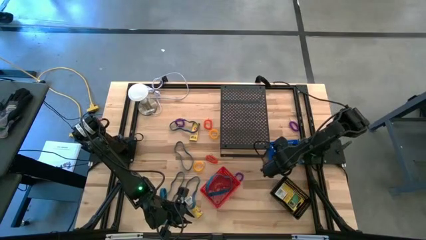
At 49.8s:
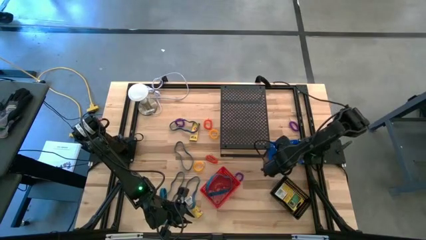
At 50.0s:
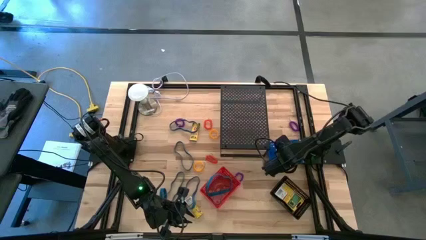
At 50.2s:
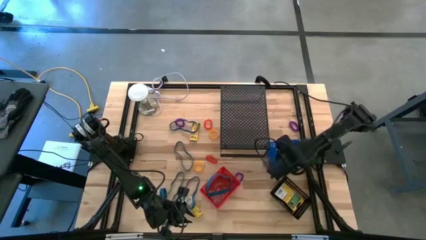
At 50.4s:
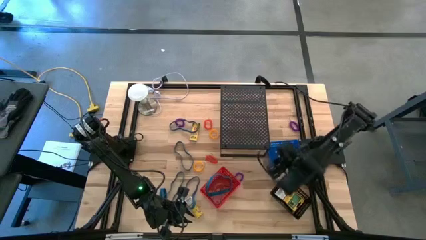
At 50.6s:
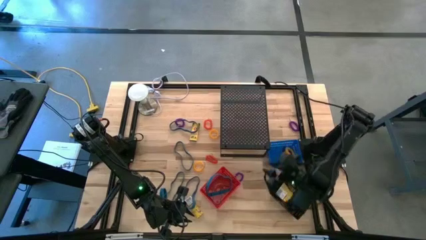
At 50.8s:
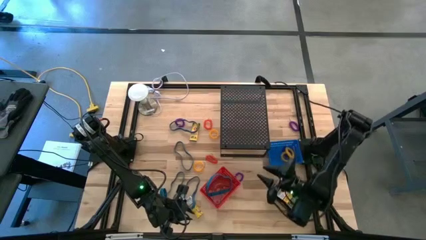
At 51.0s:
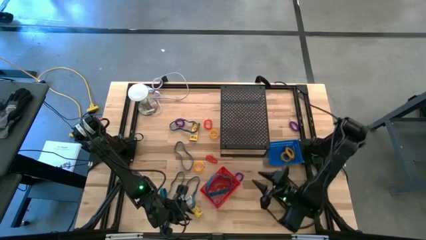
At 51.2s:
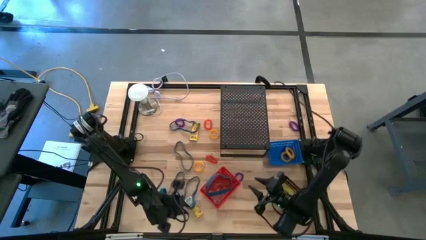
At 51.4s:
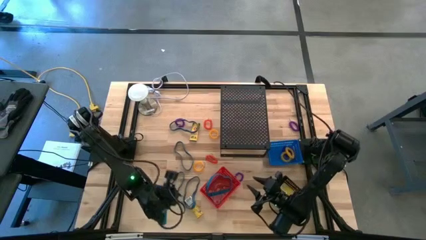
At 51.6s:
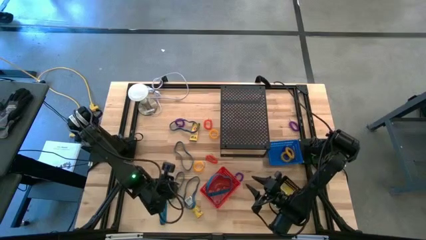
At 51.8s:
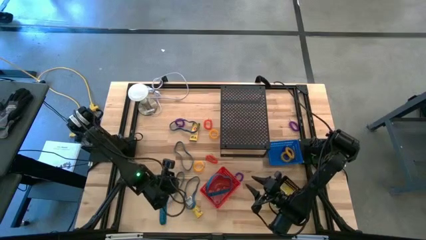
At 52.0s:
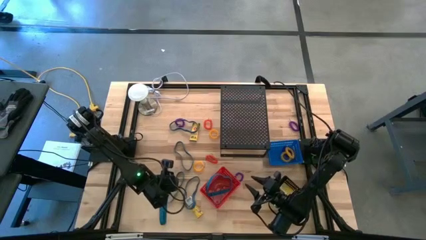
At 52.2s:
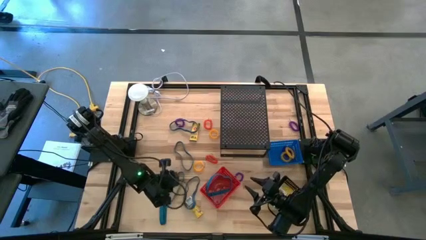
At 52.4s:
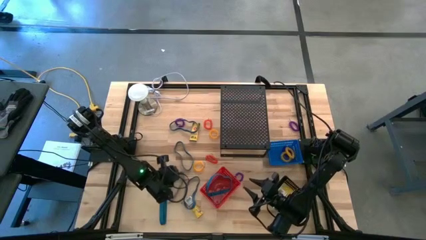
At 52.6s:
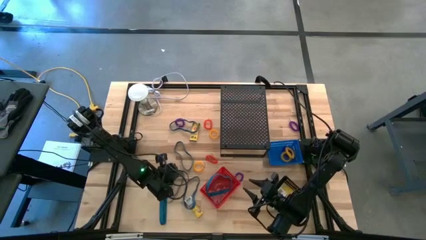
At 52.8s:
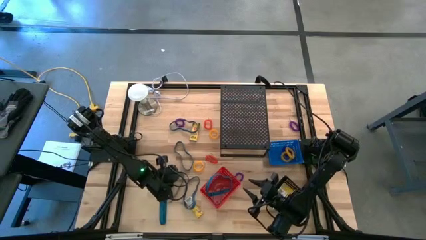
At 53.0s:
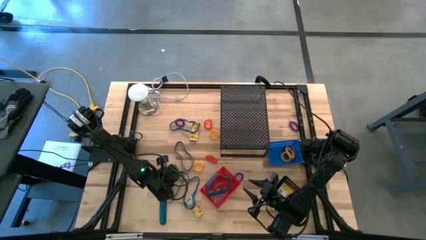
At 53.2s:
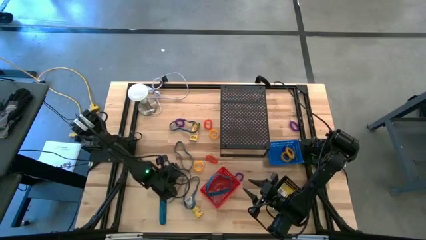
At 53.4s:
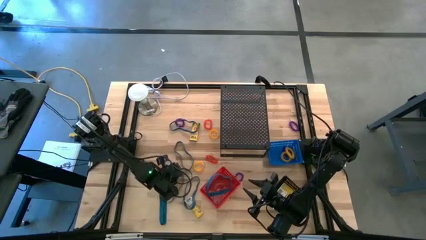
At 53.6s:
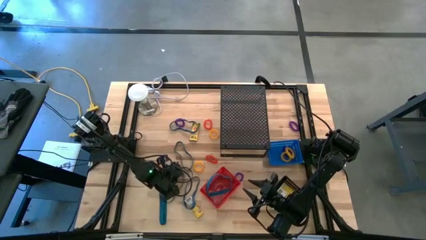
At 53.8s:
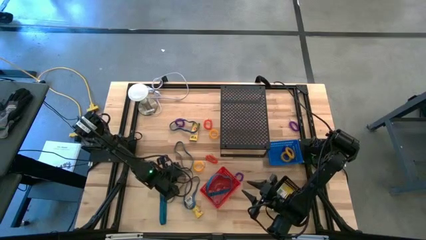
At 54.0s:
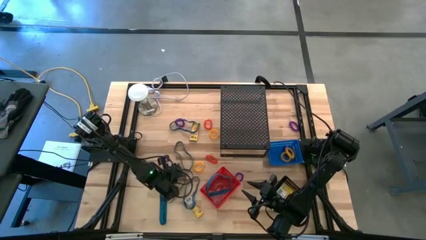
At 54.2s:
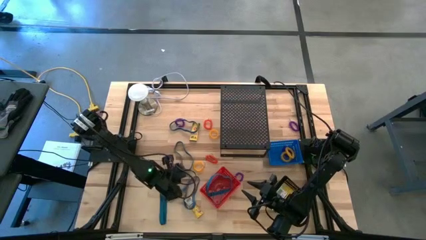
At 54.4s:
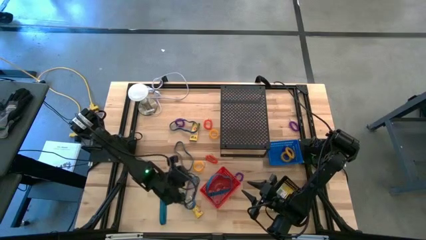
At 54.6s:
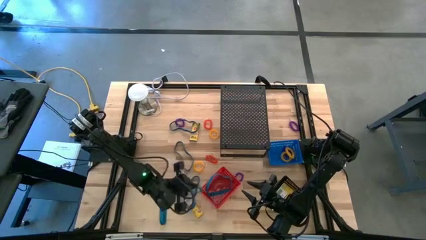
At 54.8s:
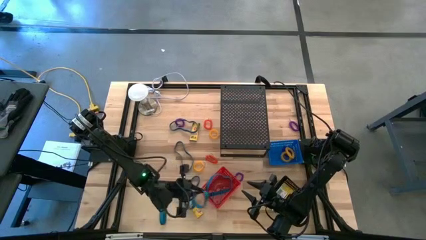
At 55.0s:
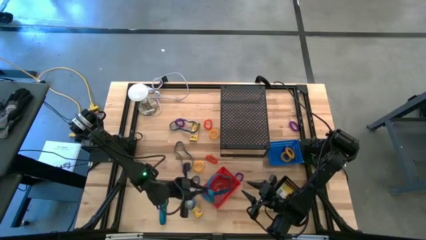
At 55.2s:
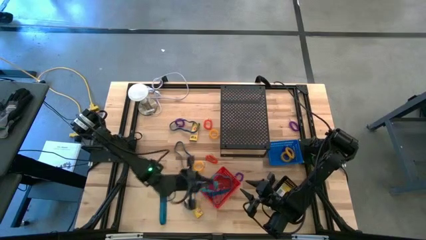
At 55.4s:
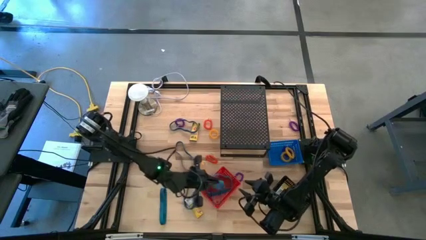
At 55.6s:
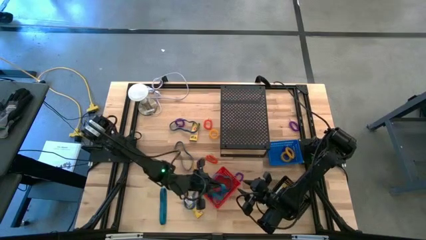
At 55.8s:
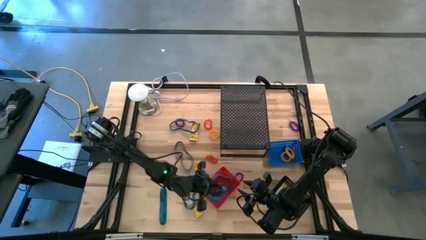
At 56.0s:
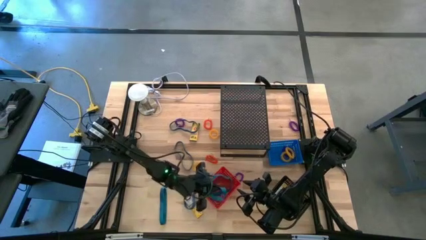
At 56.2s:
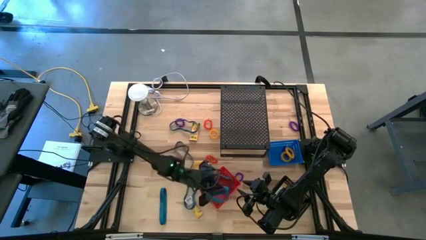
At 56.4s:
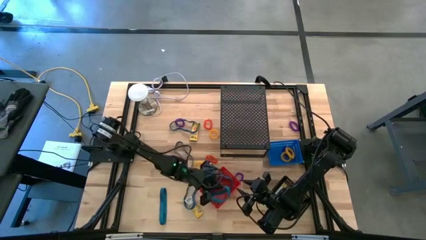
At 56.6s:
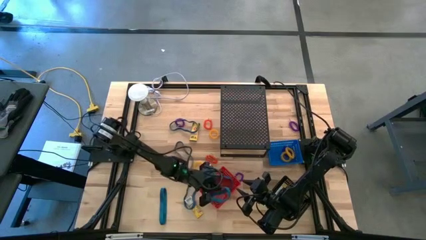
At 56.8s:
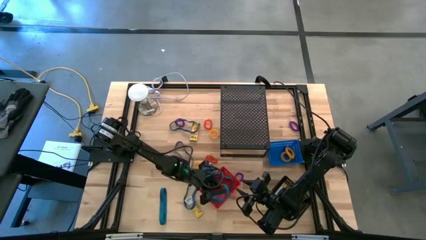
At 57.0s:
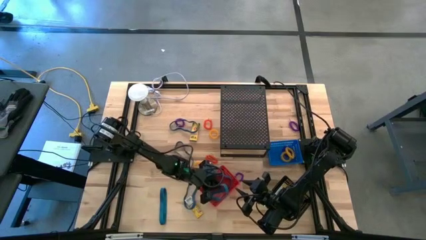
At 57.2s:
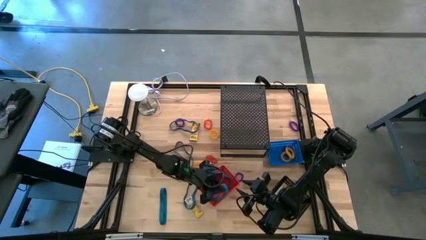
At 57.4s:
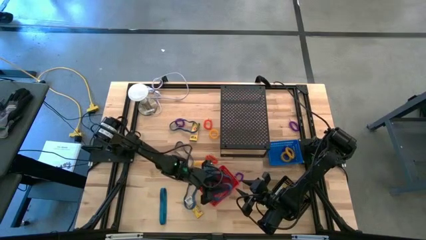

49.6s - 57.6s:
Task: Pick & Place Office Desk Supplies
Put the blue rubberband into the red basket

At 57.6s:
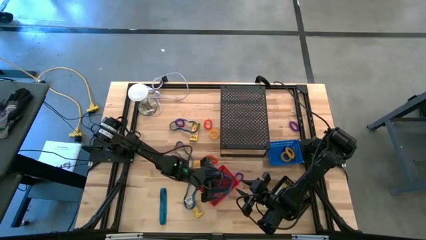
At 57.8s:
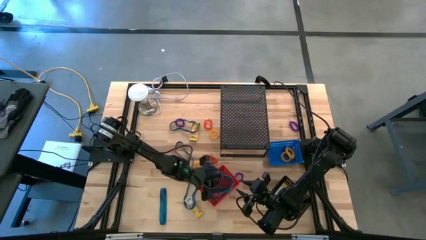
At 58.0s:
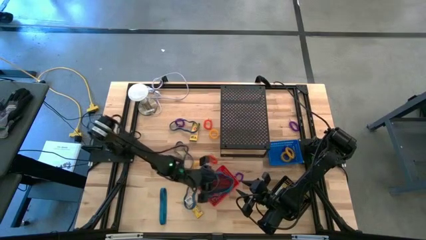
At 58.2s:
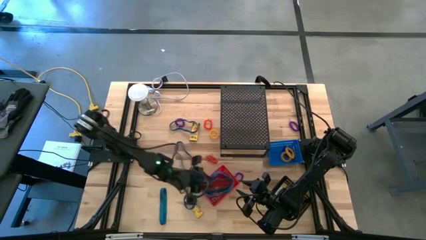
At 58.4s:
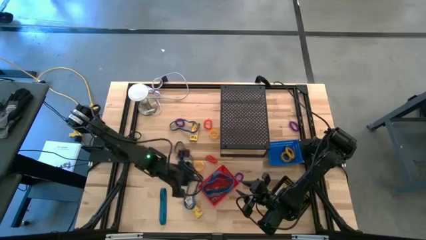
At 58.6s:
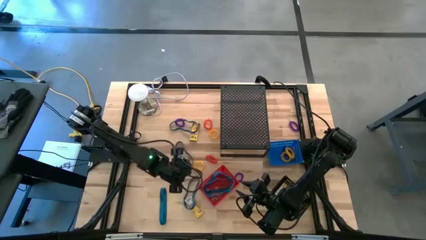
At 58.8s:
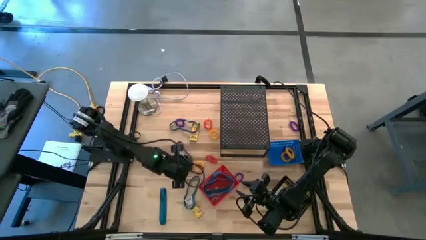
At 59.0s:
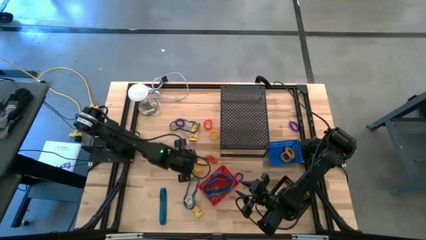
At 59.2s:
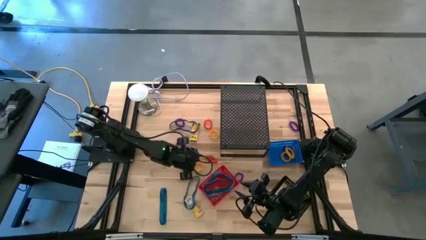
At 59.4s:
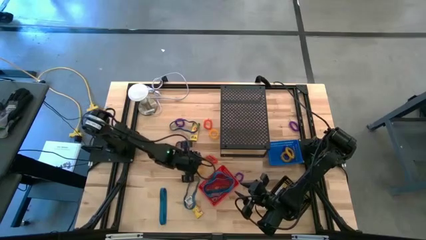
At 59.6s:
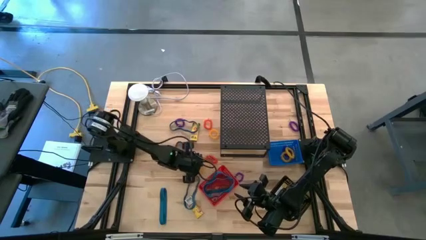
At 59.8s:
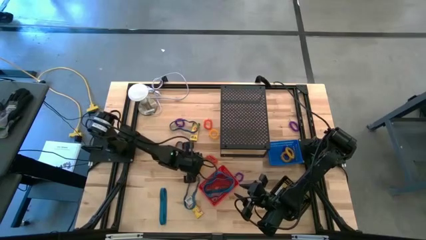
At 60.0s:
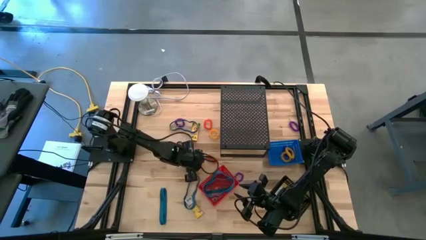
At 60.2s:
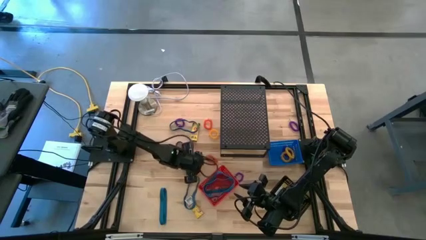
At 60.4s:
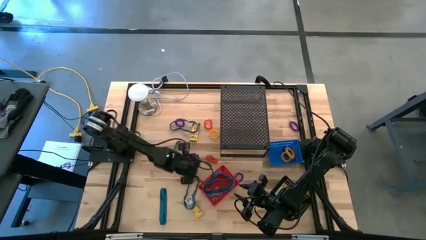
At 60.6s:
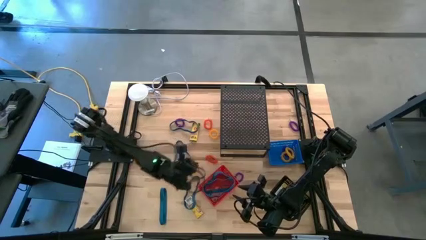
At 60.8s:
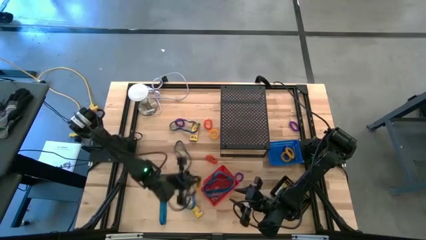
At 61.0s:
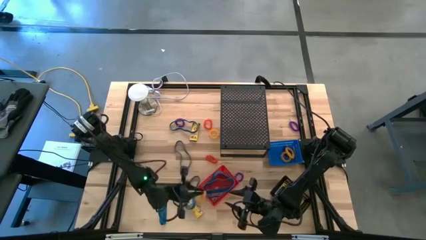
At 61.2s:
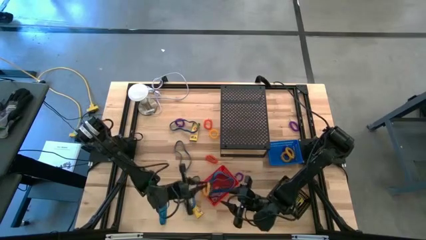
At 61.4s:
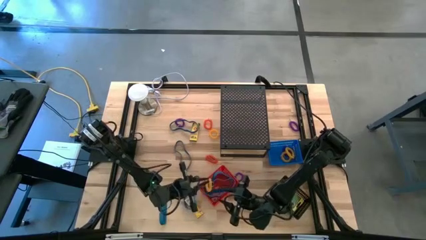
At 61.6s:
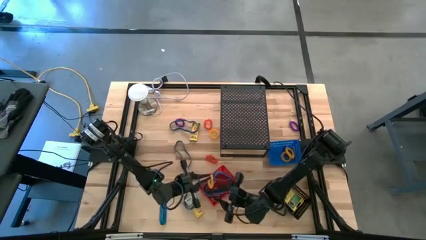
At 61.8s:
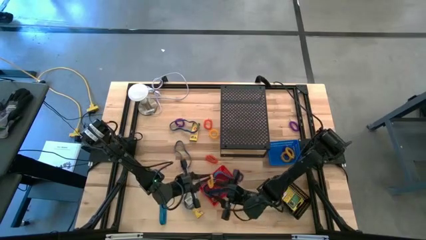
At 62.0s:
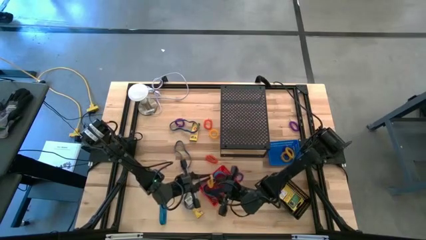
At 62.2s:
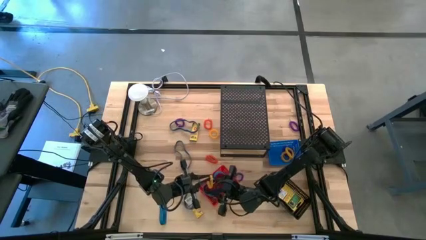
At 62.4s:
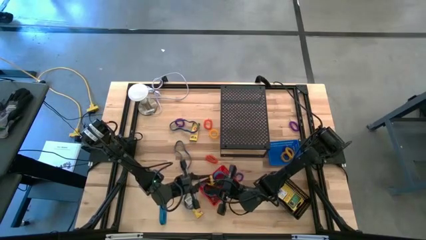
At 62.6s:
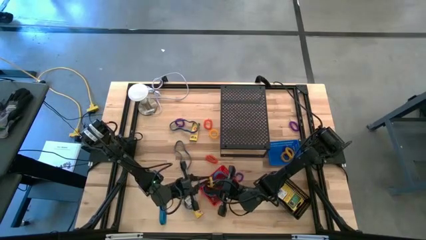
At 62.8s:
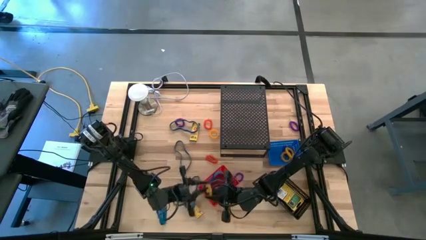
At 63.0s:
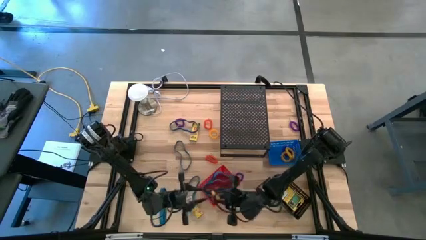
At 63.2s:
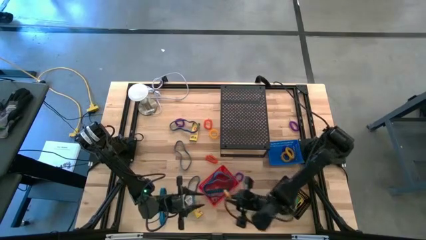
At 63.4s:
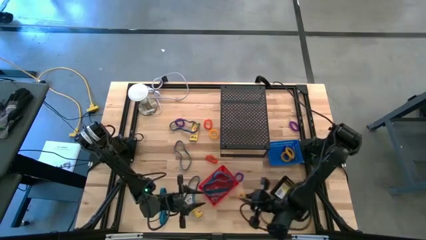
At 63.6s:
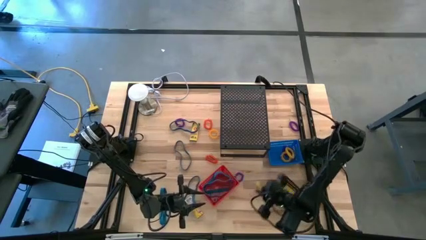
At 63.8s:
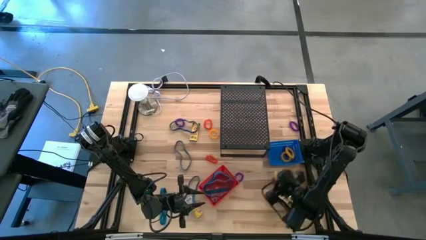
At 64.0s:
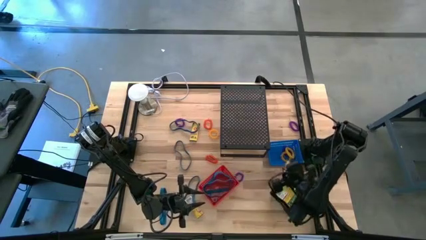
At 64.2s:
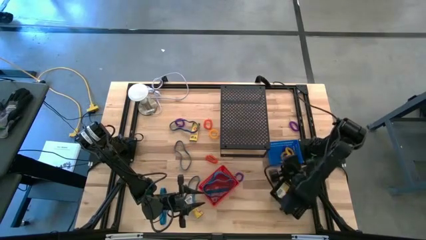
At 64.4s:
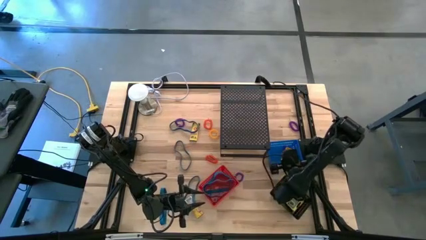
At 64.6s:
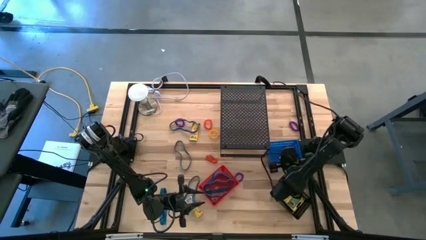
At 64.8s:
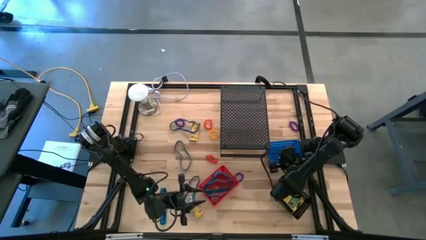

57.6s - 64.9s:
Put the yellow spring keychain into the blue basket
